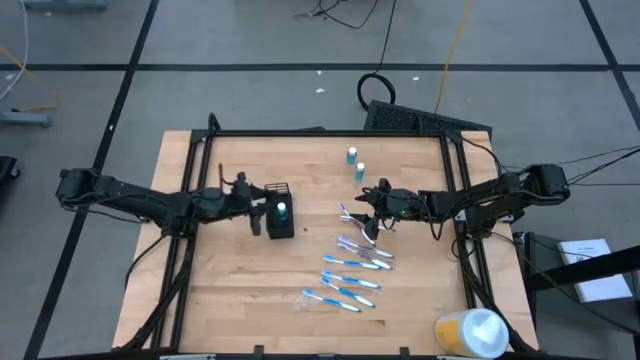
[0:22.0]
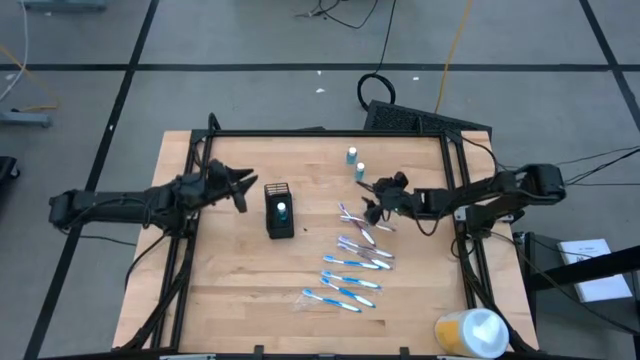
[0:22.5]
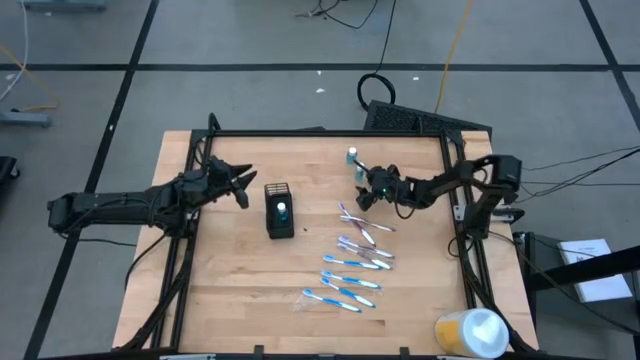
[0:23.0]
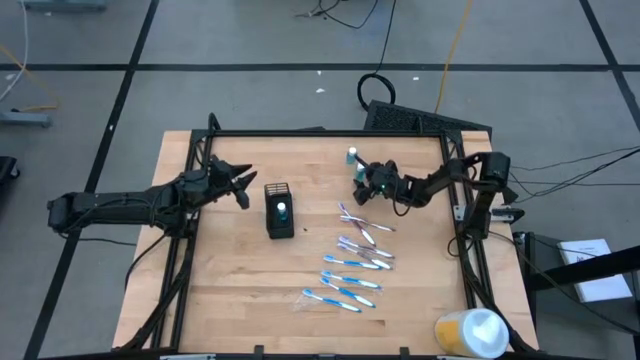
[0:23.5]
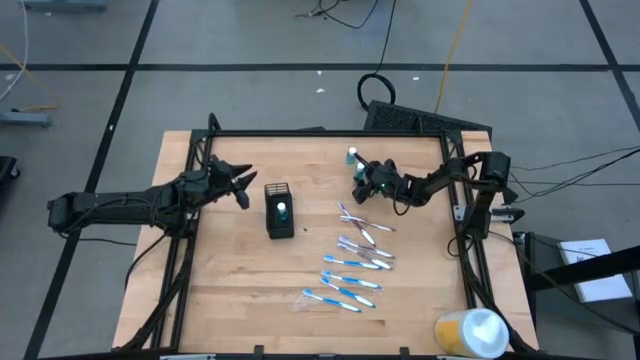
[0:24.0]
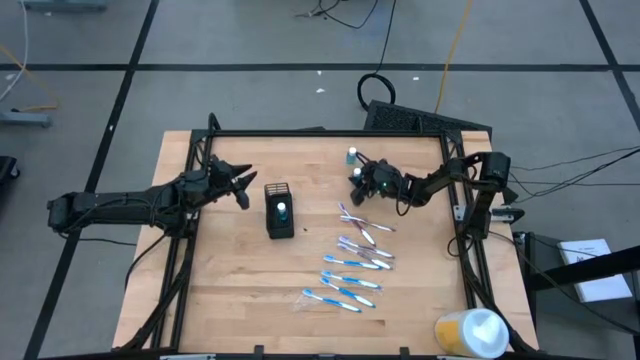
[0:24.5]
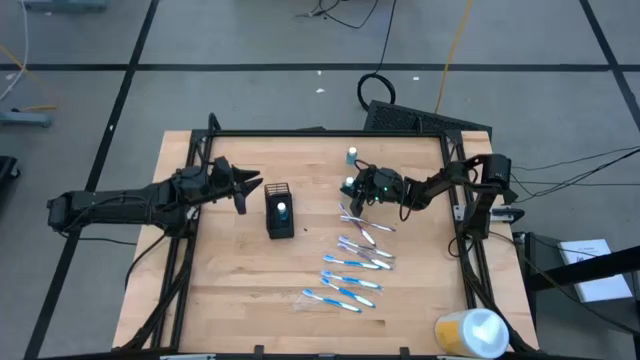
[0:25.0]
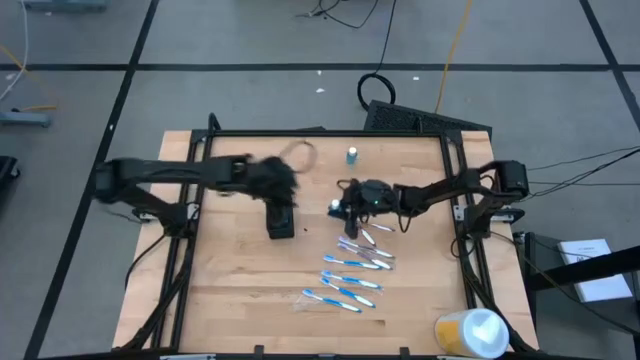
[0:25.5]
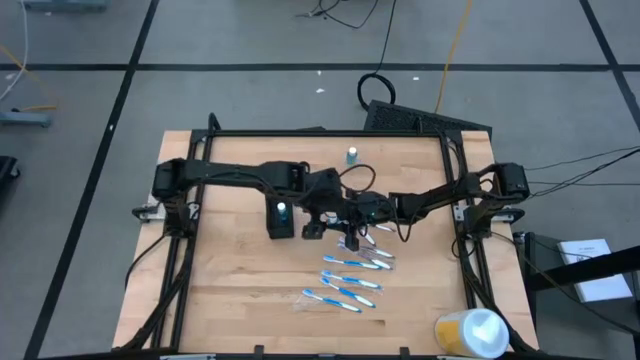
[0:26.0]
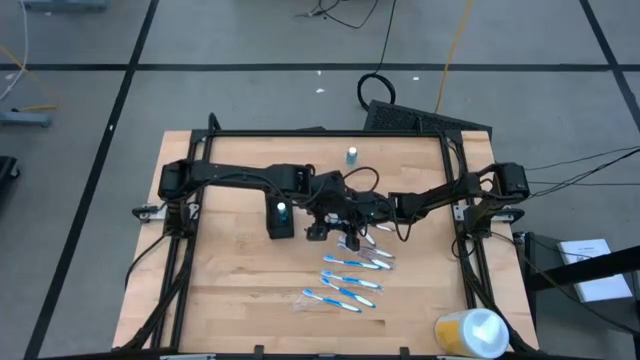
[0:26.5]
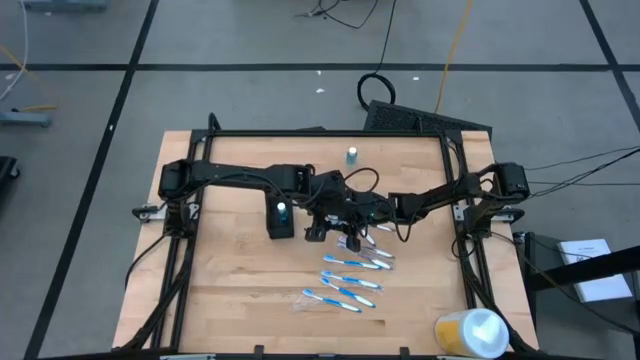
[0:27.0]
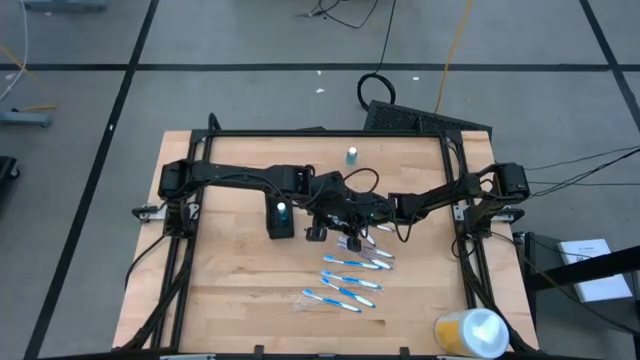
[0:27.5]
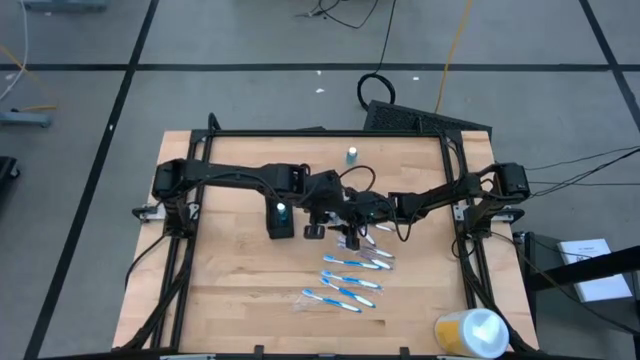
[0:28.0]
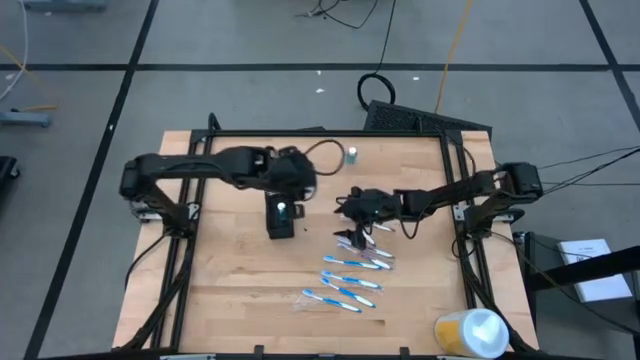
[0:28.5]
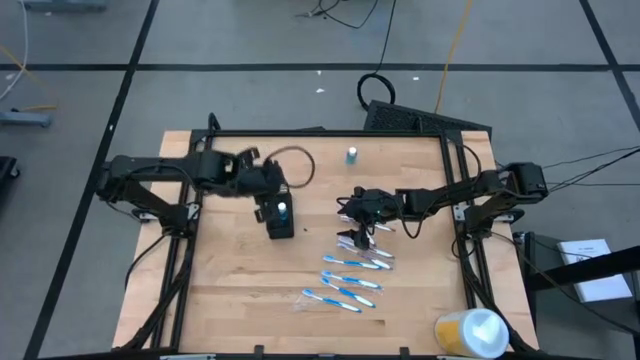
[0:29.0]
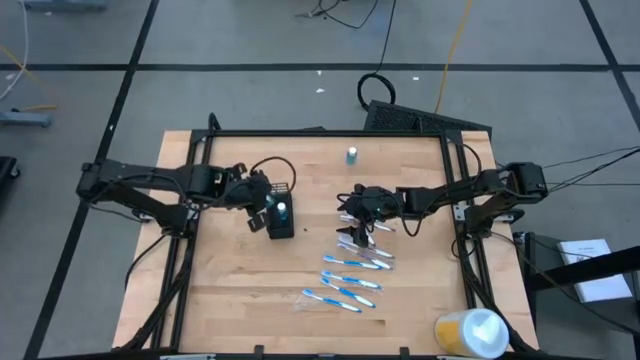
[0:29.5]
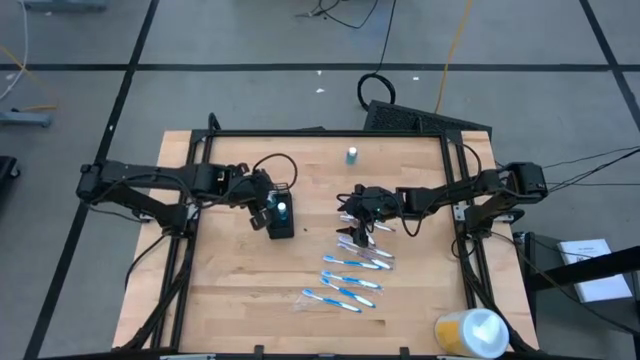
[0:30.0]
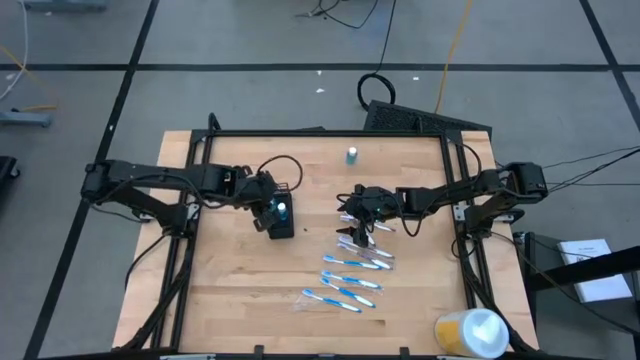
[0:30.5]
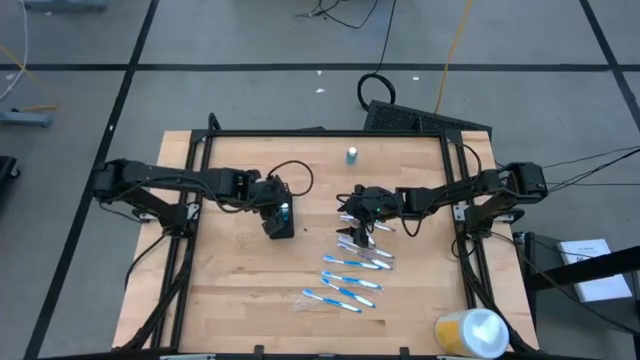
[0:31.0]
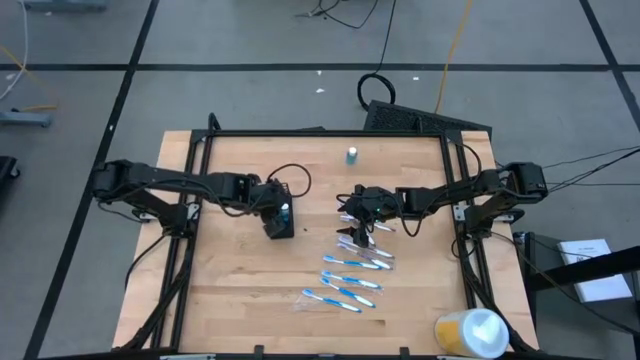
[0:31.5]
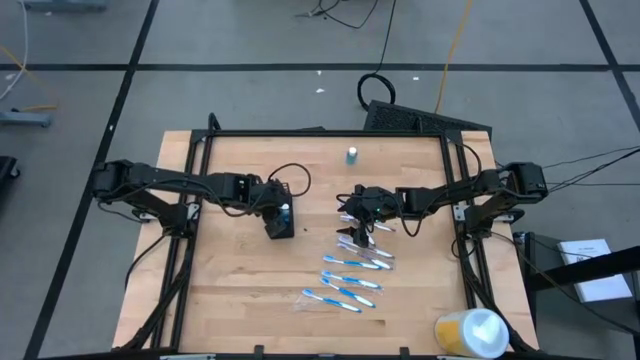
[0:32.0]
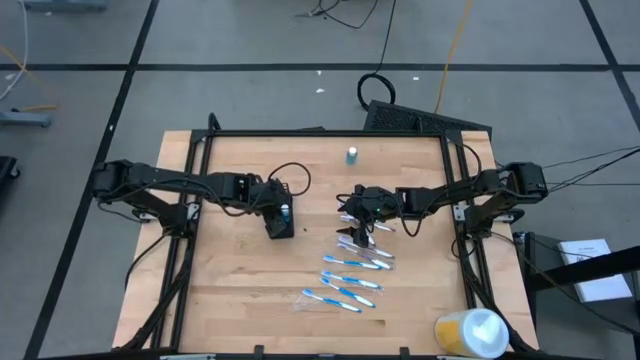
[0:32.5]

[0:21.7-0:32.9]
Task: Pick & Place toothbrushing station
Put the mouthwash into the black organizer

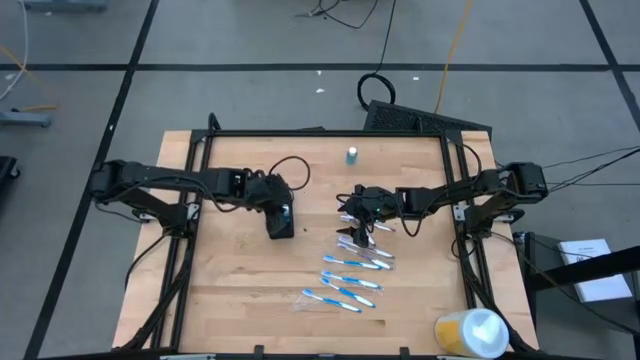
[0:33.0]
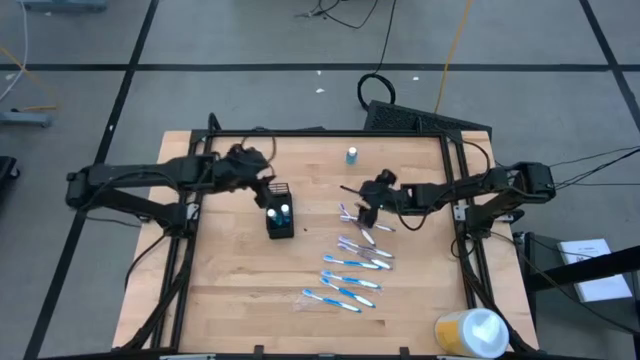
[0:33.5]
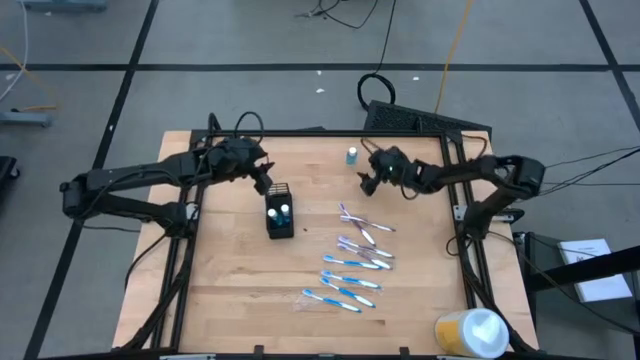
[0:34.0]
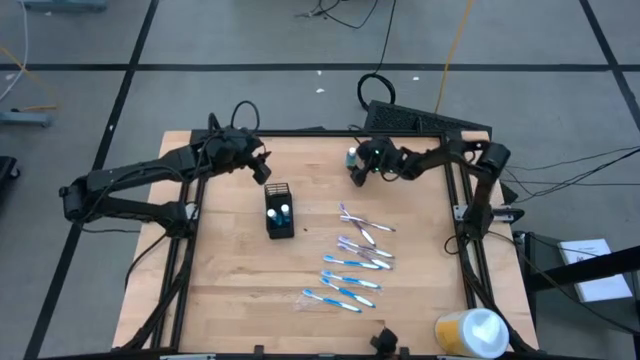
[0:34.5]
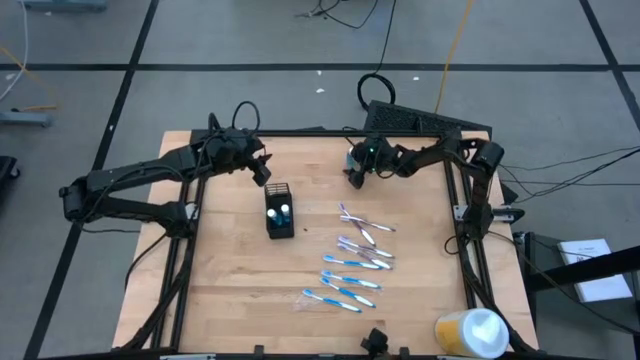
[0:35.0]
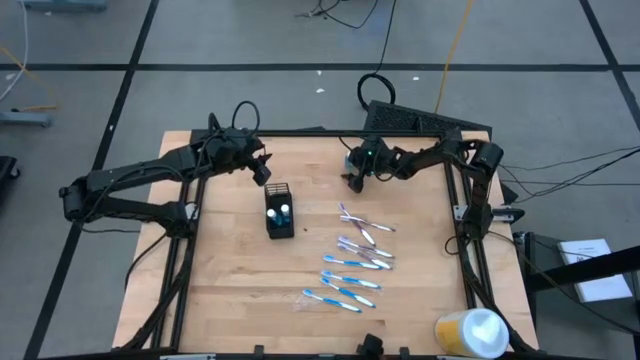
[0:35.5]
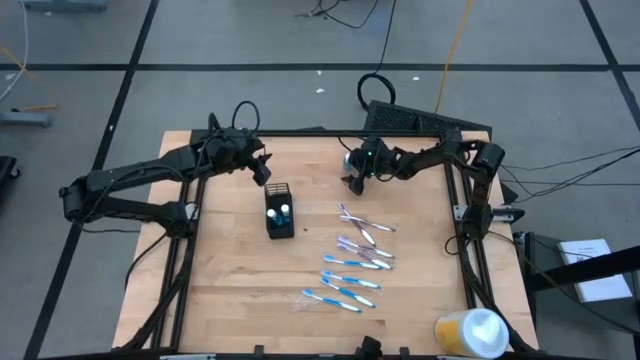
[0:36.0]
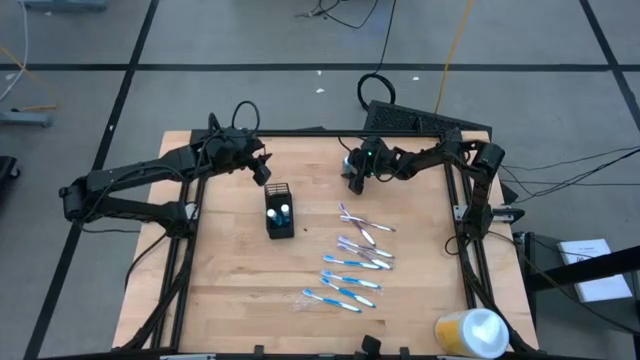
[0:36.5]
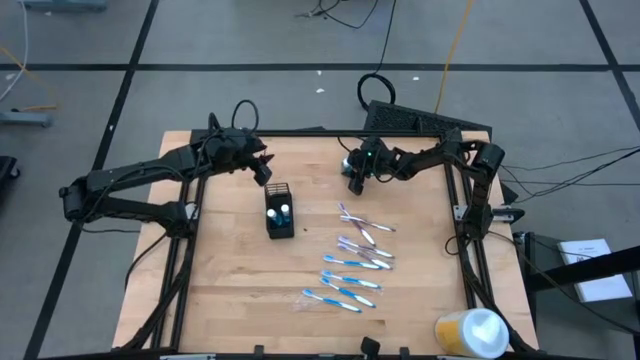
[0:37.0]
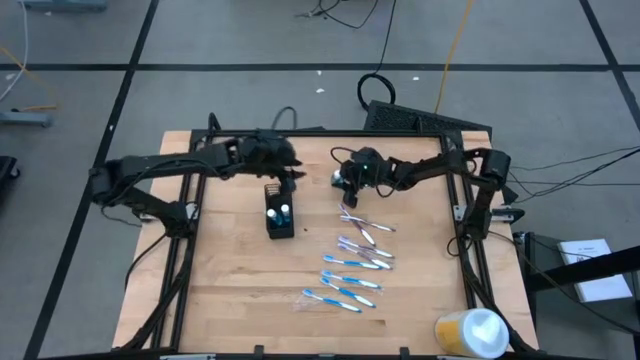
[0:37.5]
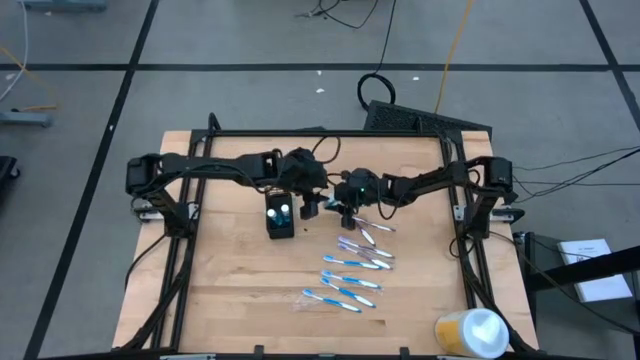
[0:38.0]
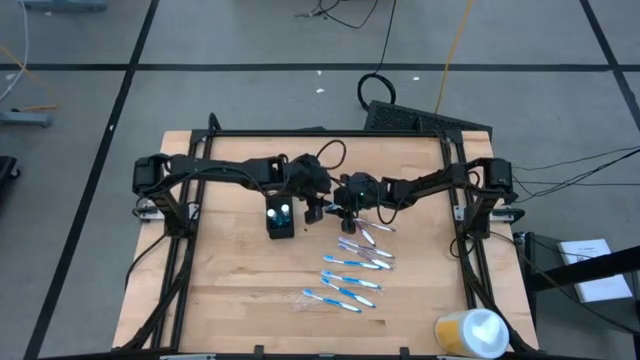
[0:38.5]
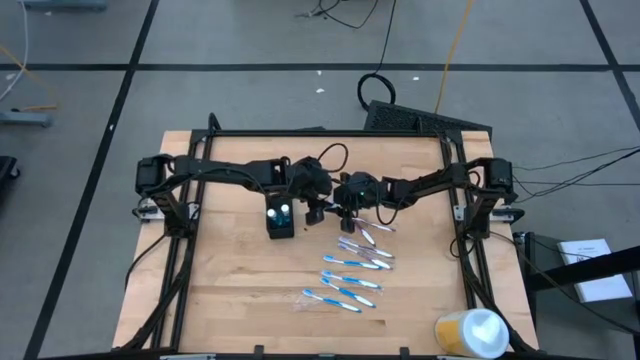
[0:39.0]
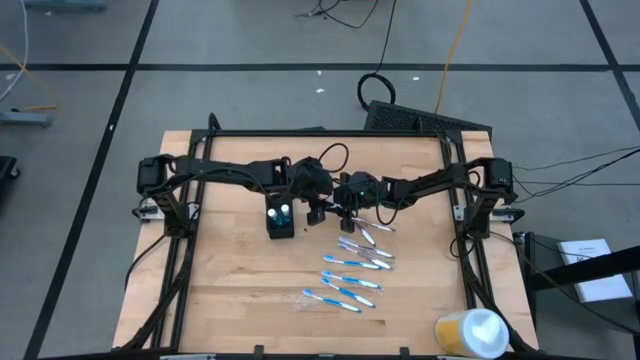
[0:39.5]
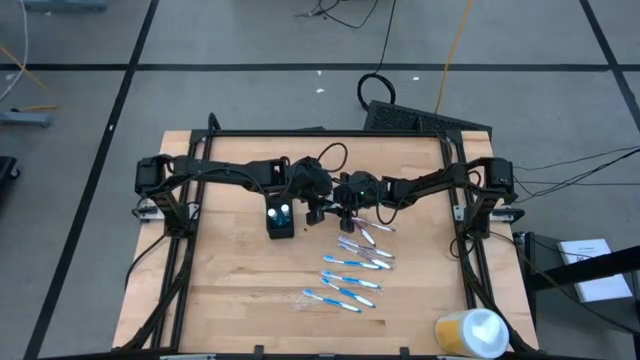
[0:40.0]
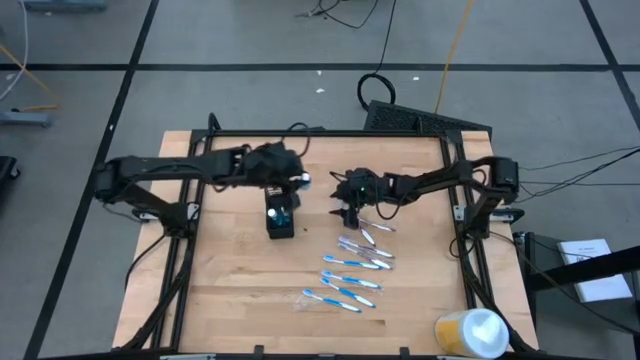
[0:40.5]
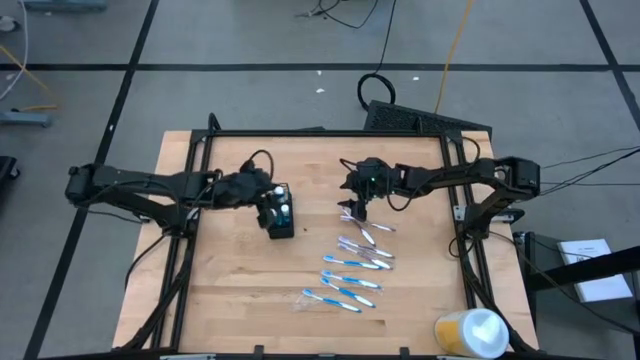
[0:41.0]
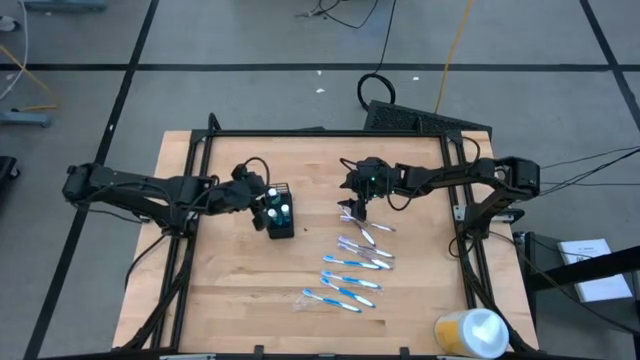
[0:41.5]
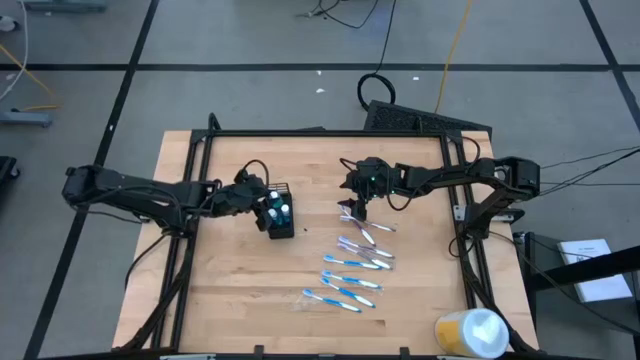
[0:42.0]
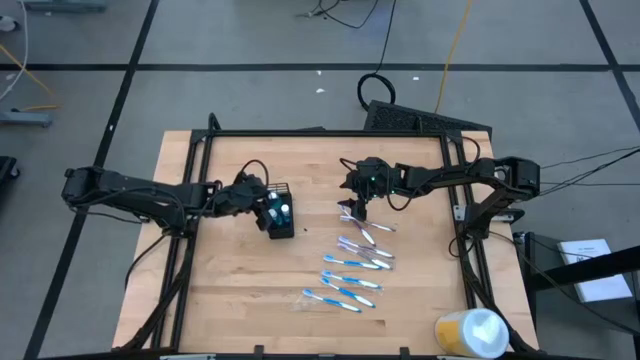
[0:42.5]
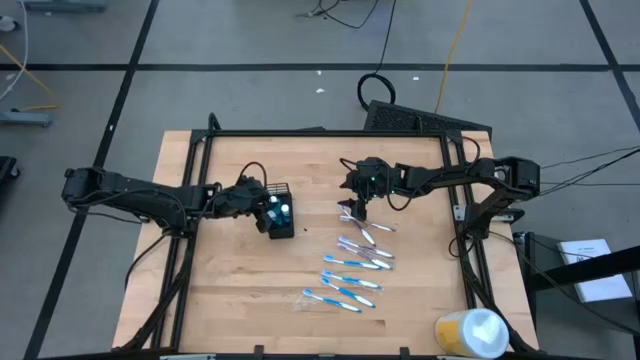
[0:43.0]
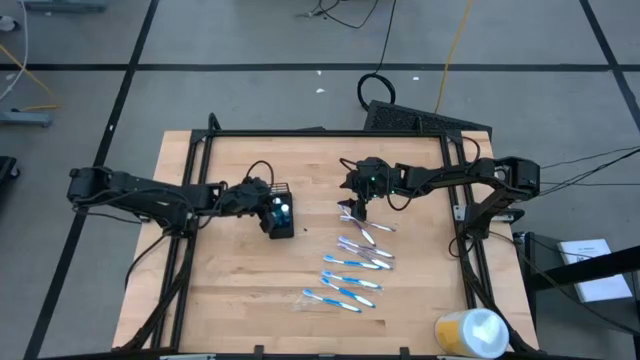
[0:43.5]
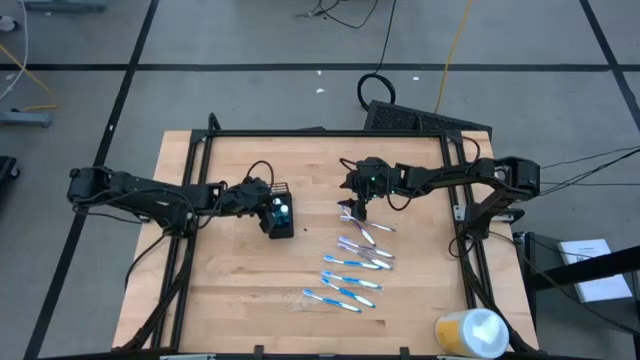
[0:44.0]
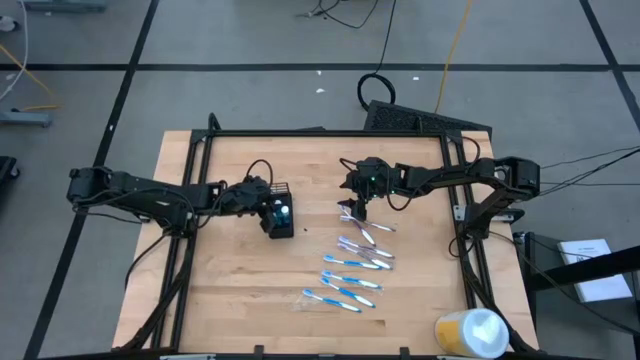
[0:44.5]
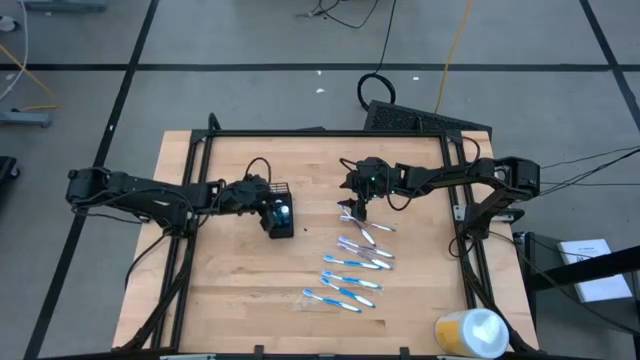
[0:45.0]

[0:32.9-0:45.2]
Put the mouthwash into the black organizer
